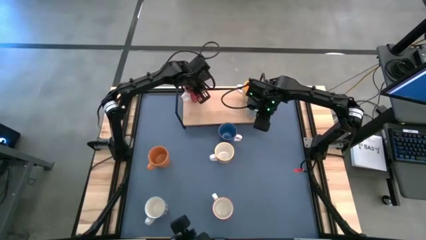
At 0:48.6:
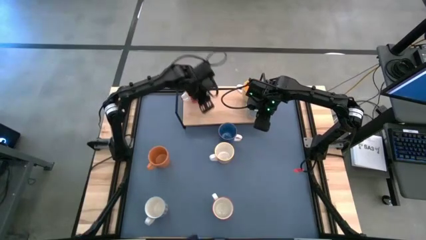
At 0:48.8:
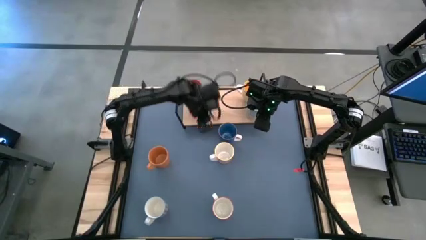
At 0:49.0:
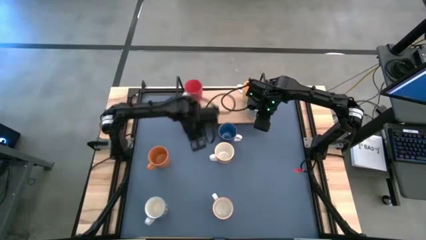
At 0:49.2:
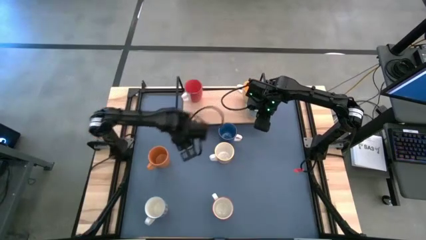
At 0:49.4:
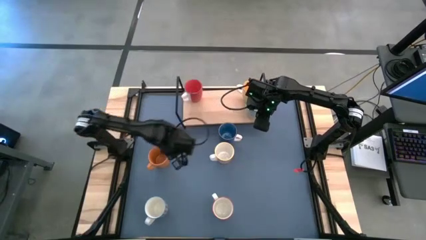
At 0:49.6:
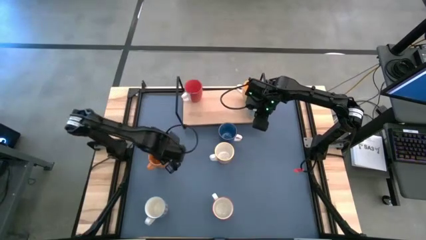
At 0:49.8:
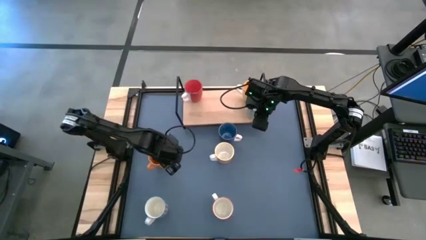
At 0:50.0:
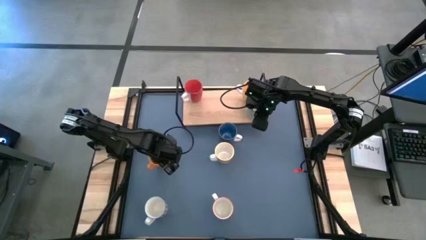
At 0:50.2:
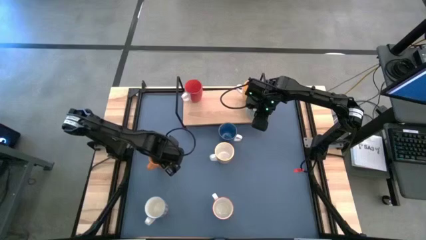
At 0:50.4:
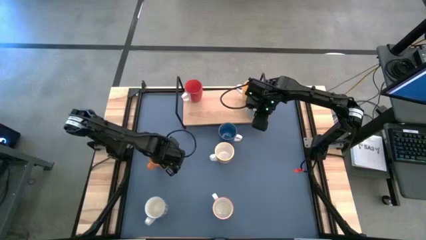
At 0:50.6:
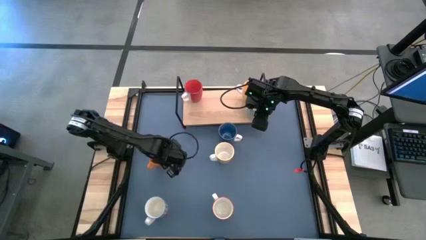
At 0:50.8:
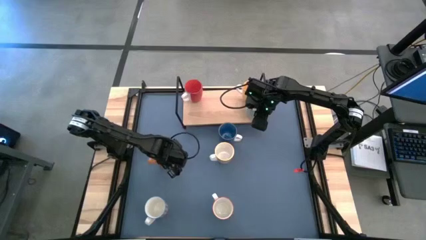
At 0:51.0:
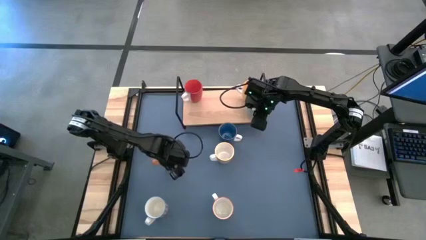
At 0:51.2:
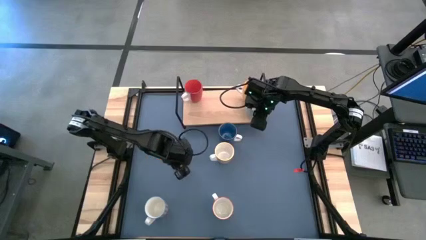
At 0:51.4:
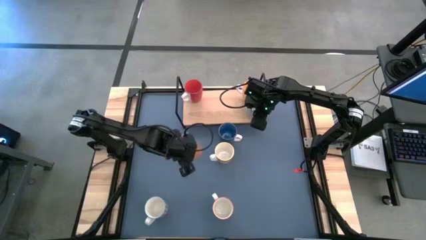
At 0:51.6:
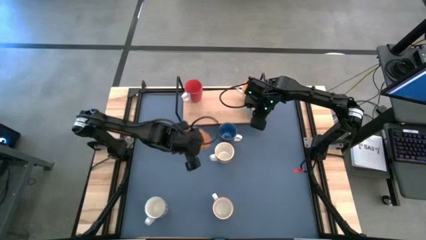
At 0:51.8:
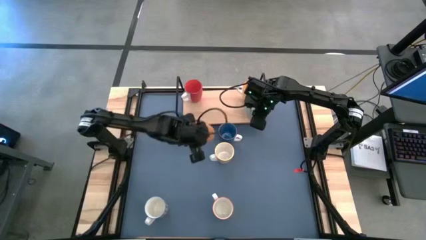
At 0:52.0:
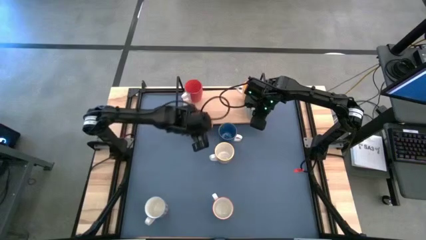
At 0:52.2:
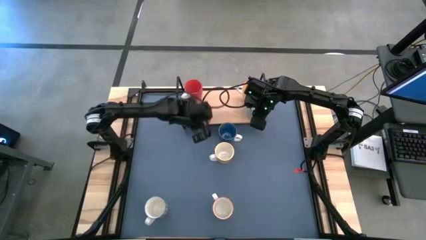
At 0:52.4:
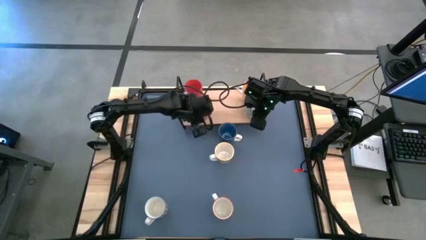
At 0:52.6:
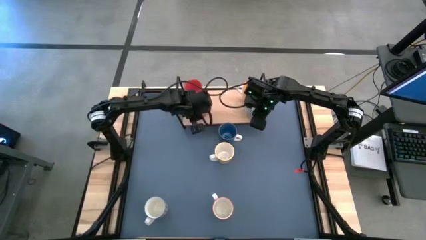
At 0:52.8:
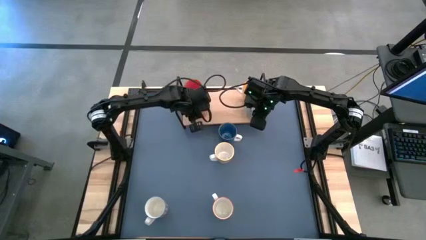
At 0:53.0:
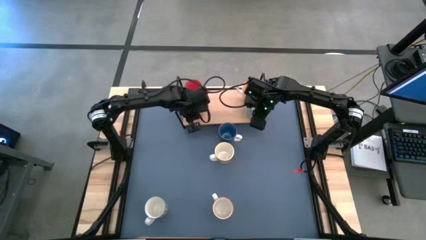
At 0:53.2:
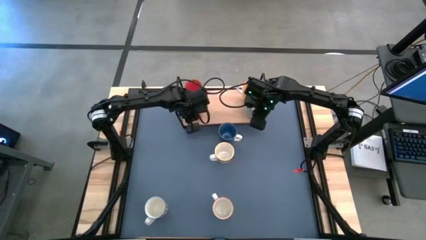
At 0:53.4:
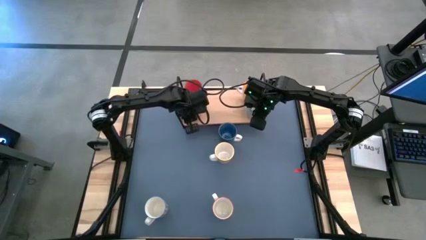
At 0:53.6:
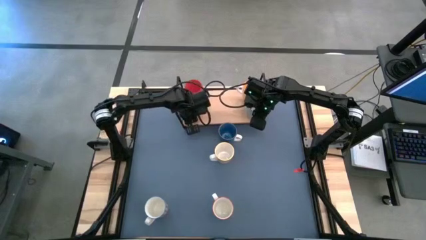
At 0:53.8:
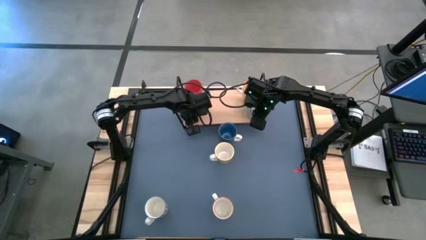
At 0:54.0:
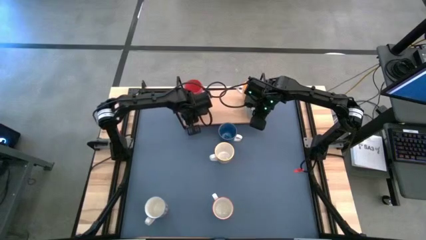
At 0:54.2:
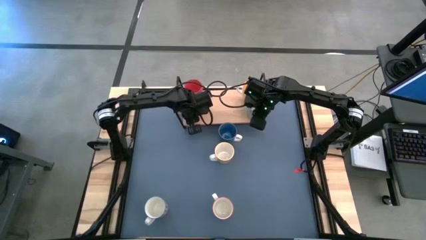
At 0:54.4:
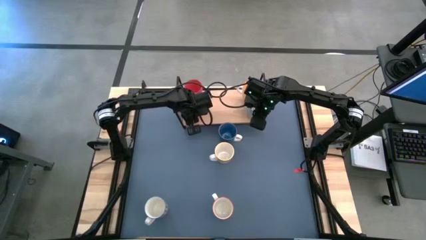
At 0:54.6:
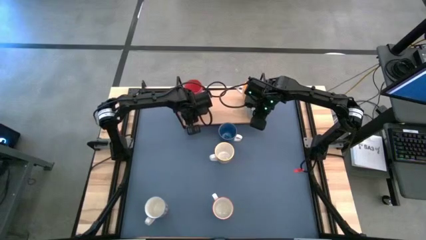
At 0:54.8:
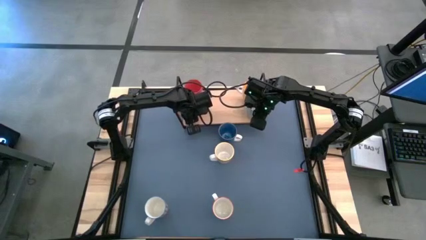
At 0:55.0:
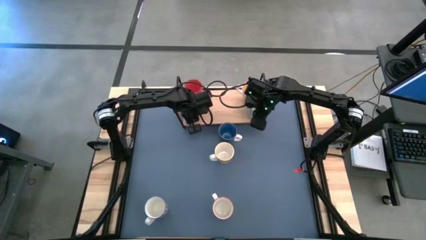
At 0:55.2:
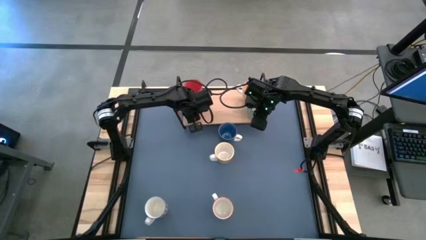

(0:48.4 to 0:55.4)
Task: Place coffee mugs
Put the orange cup on the shelf aligned with the other red cup

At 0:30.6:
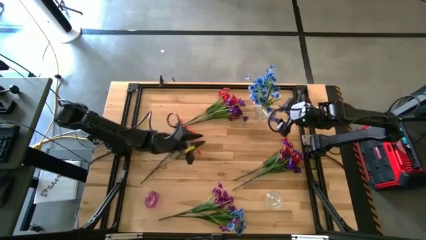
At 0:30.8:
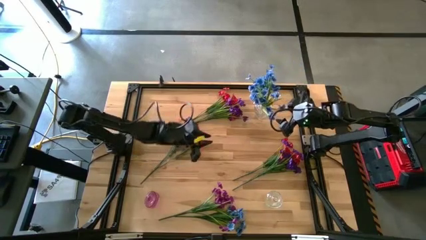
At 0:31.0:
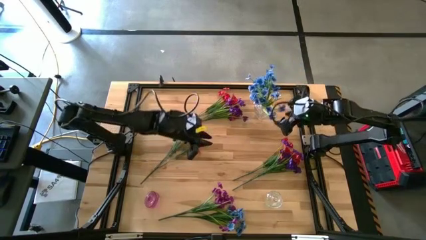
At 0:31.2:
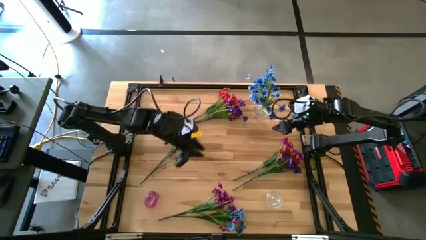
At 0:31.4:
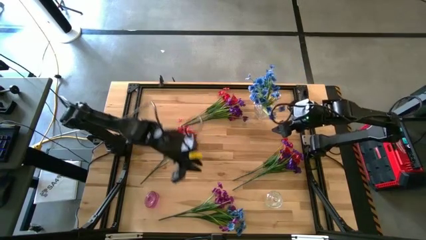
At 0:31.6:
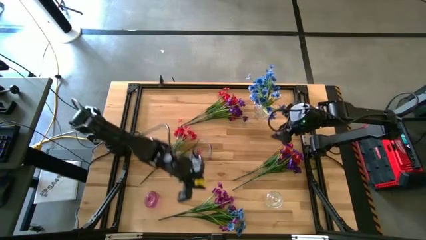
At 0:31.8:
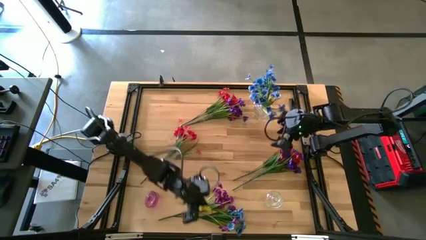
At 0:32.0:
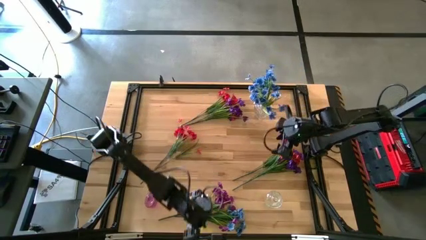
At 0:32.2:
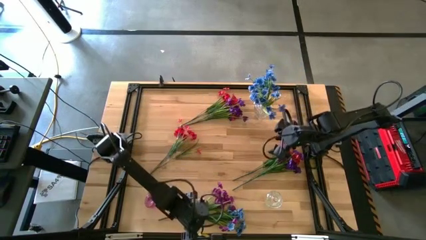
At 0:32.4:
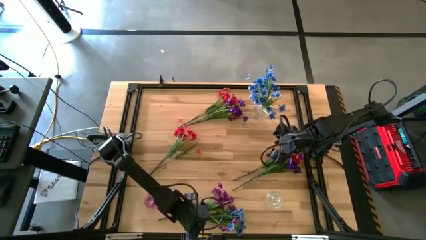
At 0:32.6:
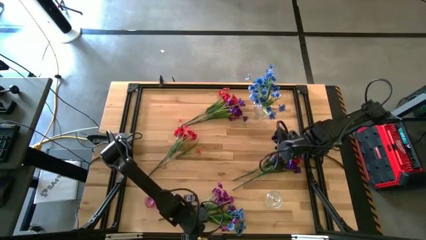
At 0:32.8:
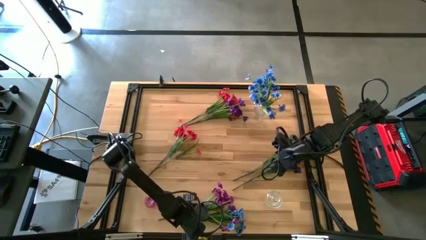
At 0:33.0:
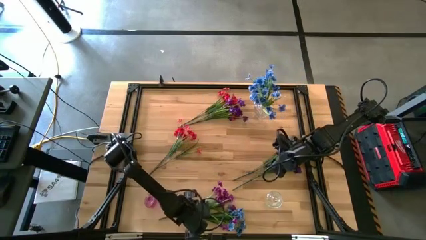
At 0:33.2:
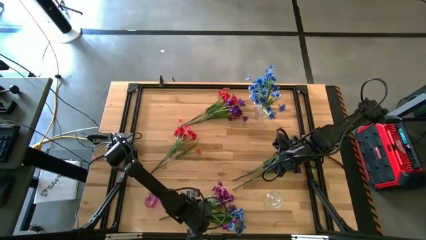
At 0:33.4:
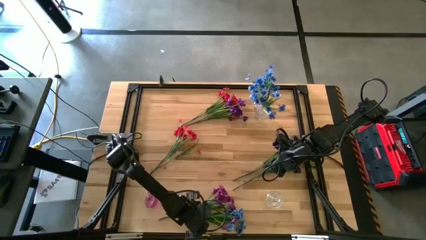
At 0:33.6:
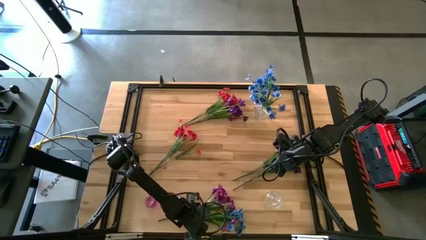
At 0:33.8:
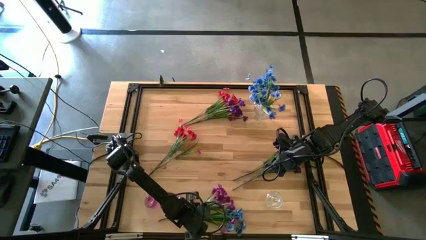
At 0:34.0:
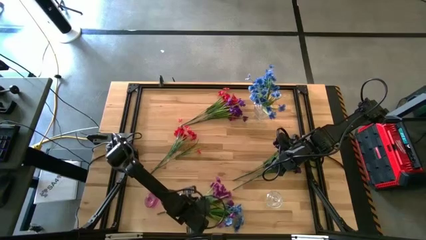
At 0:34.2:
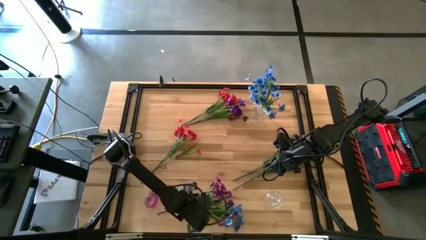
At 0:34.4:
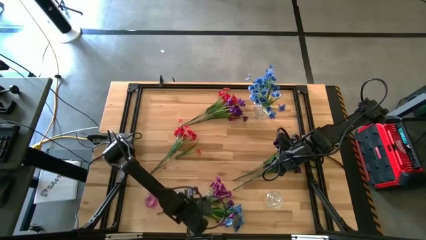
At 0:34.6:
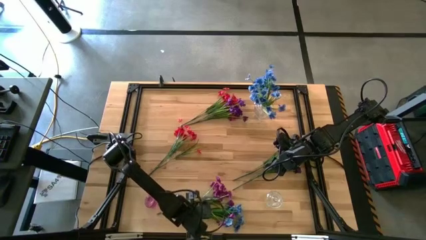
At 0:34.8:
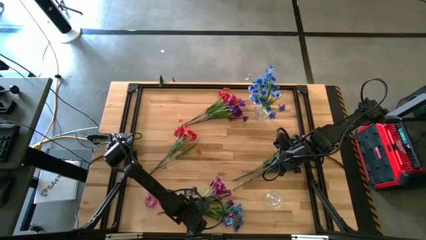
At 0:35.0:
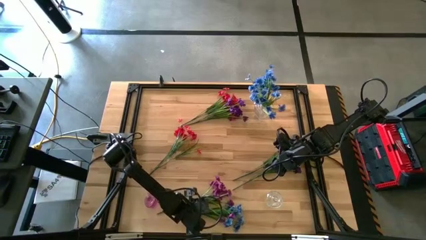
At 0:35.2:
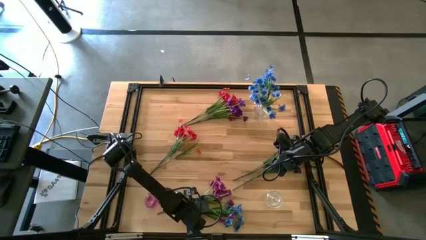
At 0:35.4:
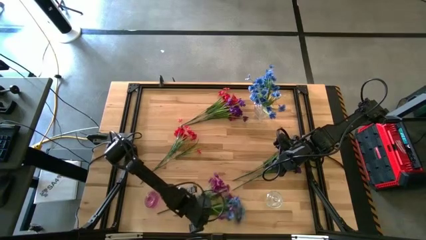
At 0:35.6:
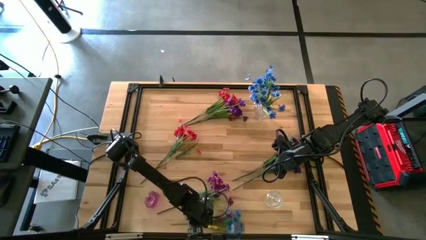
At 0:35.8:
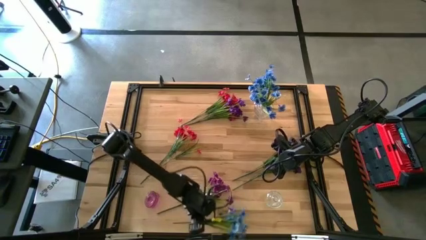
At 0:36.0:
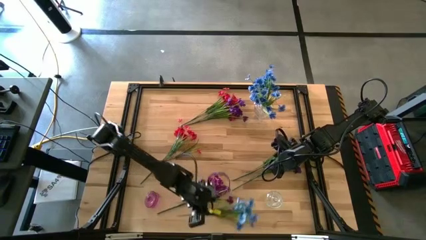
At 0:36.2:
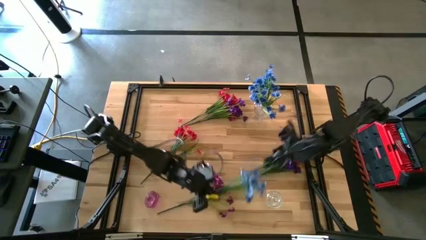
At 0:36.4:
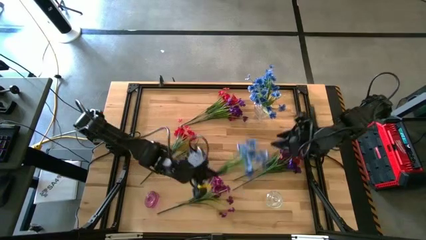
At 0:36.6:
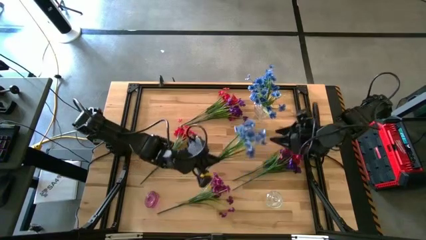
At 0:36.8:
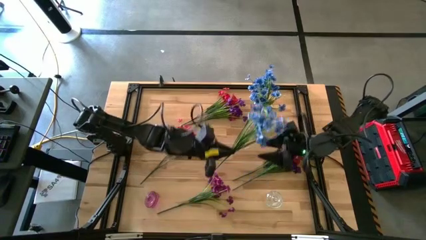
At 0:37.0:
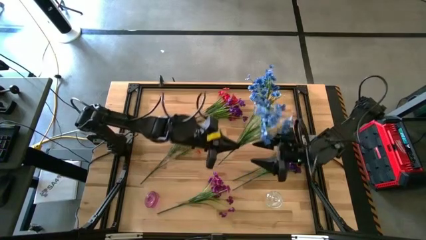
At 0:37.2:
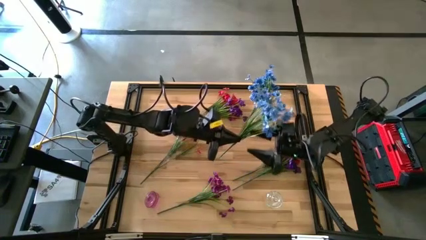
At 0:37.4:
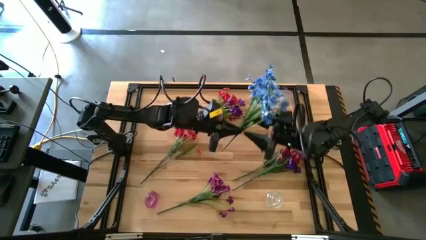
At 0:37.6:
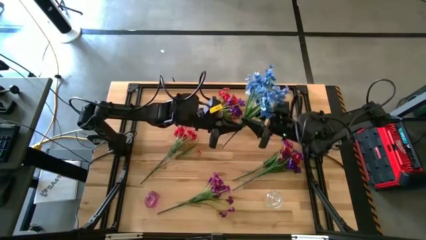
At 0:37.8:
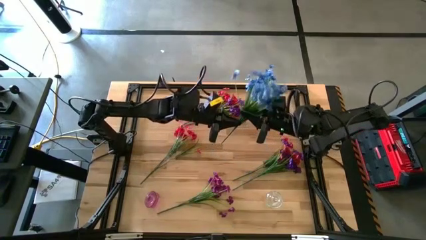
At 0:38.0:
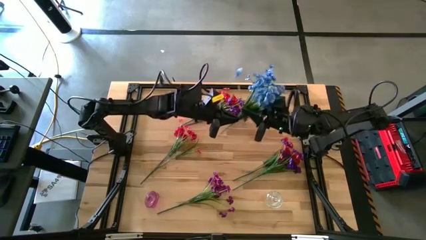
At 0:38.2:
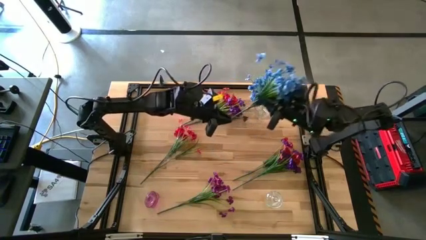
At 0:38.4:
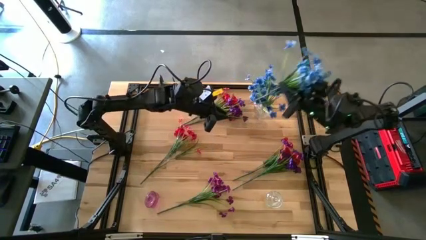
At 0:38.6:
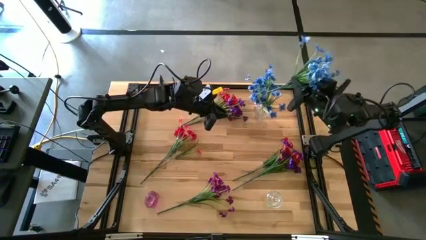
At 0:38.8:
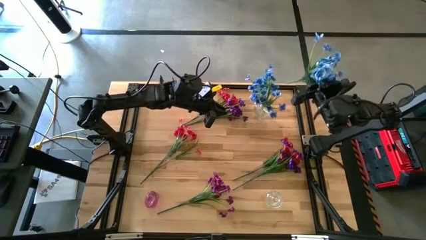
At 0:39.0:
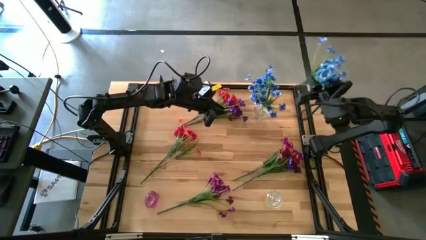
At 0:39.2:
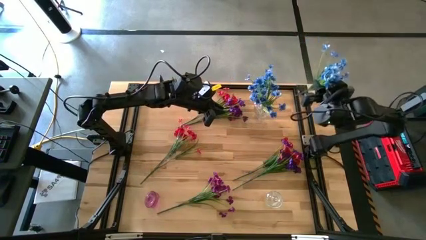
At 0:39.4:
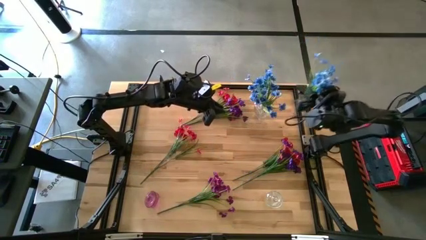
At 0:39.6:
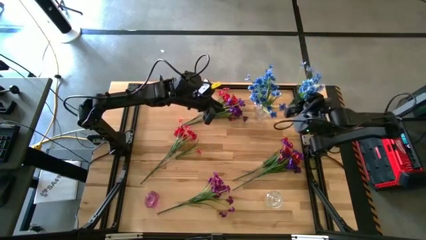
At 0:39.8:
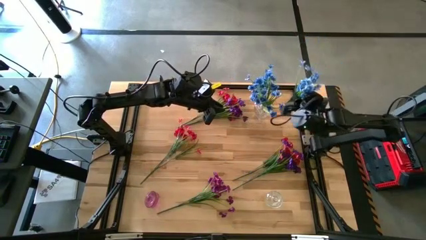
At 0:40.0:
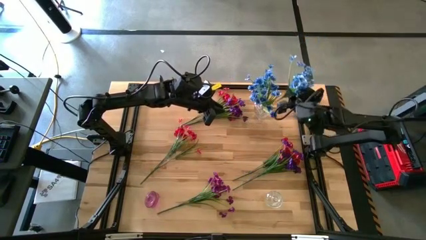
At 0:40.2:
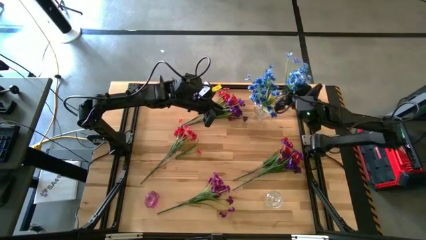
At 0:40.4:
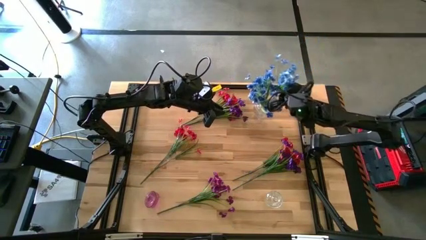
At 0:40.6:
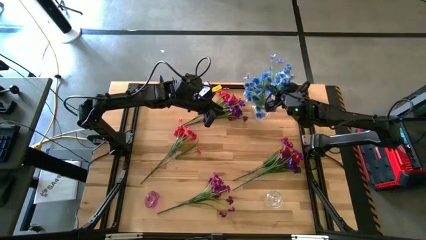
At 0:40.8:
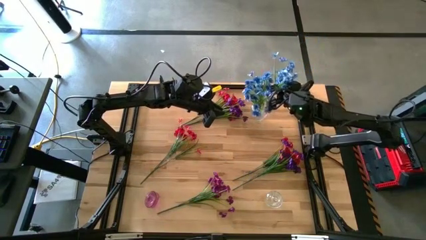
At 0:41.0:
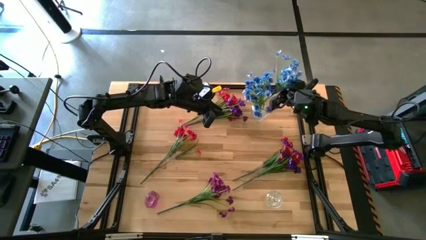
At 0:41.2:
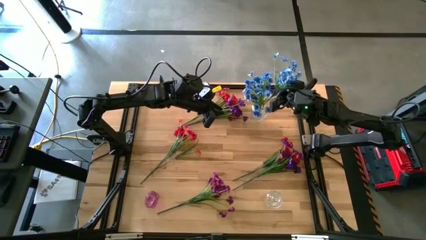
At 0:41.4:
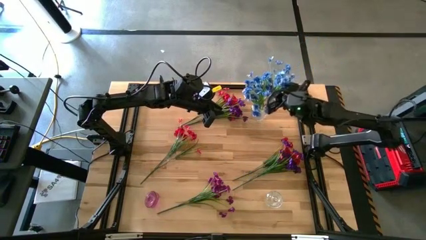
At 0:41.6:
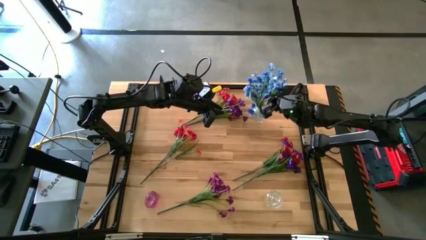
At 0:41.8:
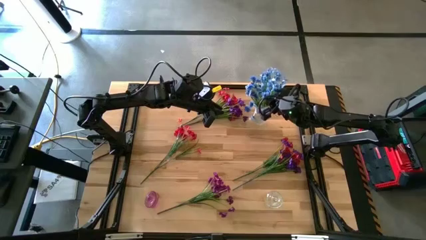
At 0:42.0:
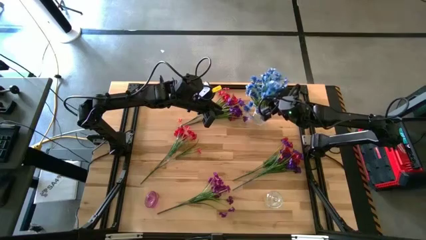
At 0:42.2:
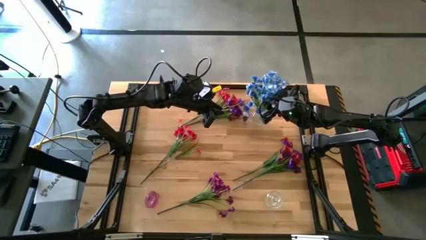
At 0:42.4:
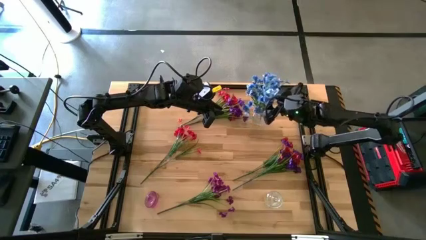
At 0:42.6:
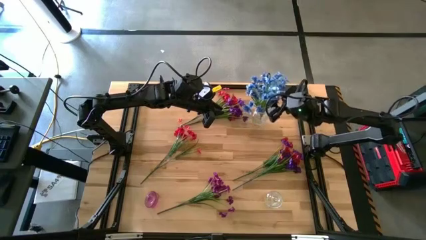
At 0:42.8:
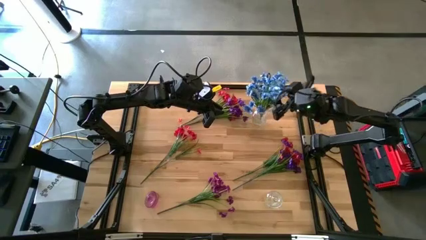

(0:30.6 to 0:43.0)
Task: Sort flowers into vase by color
Put the blue flower into the top transparent flower vase
